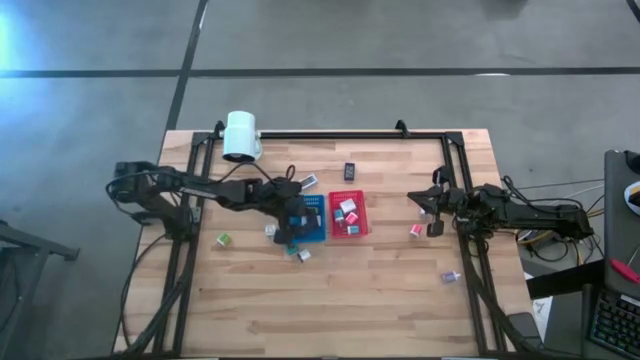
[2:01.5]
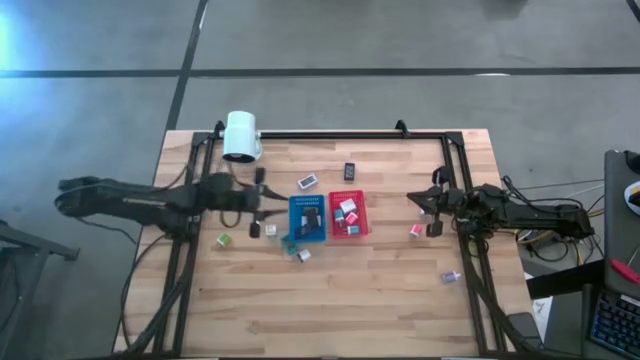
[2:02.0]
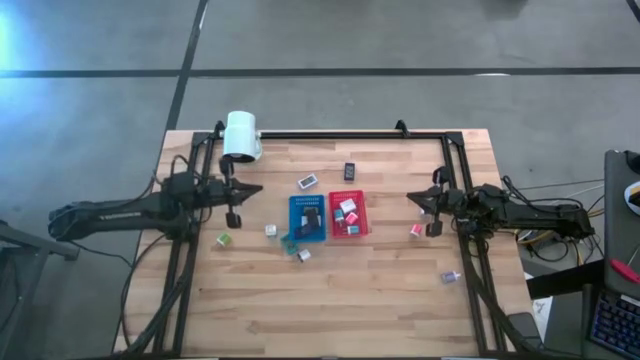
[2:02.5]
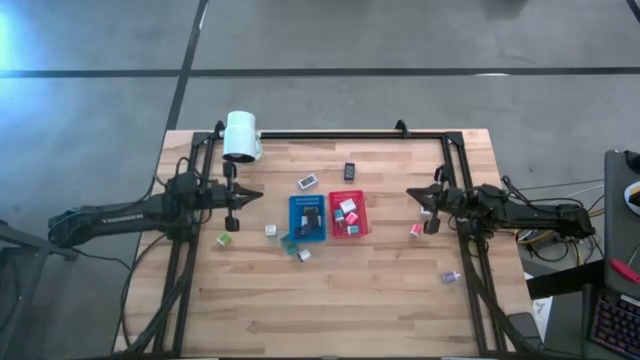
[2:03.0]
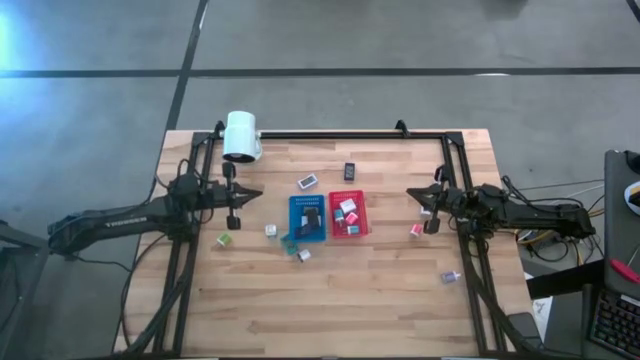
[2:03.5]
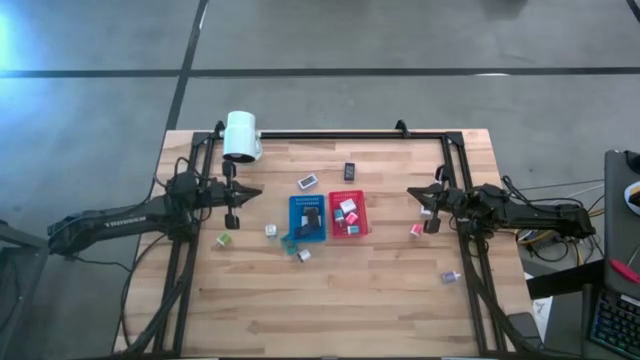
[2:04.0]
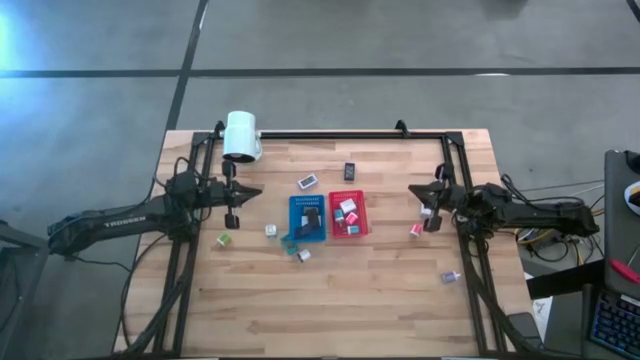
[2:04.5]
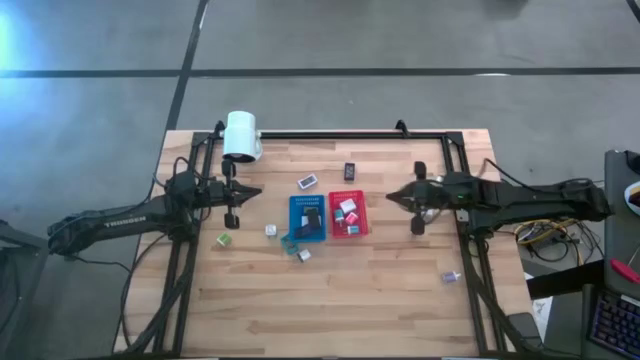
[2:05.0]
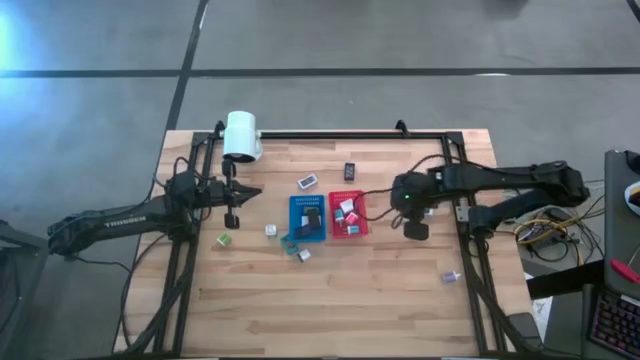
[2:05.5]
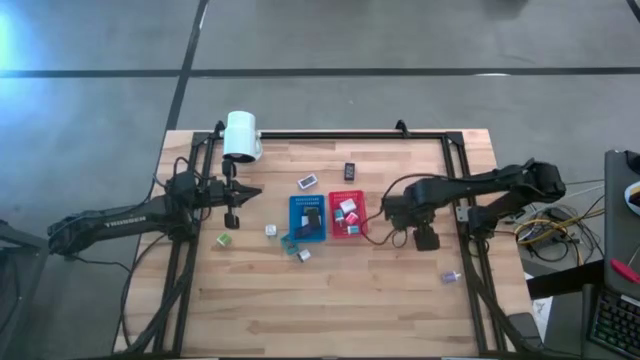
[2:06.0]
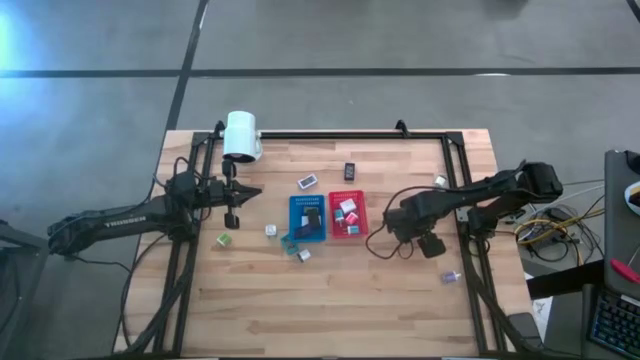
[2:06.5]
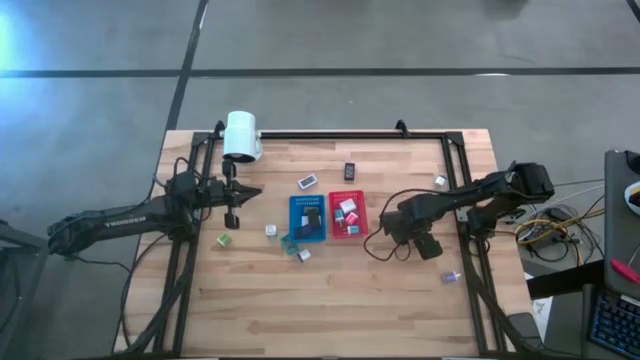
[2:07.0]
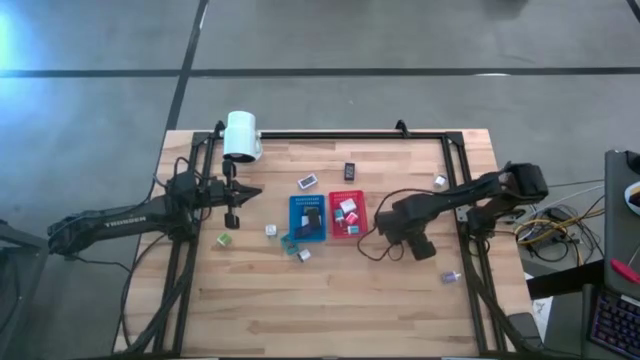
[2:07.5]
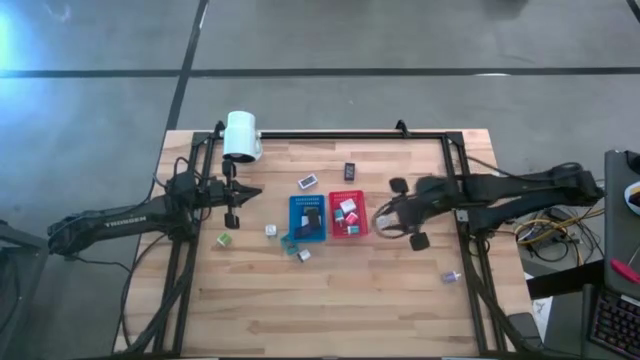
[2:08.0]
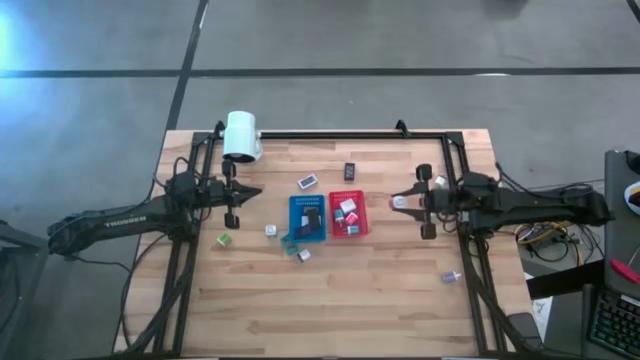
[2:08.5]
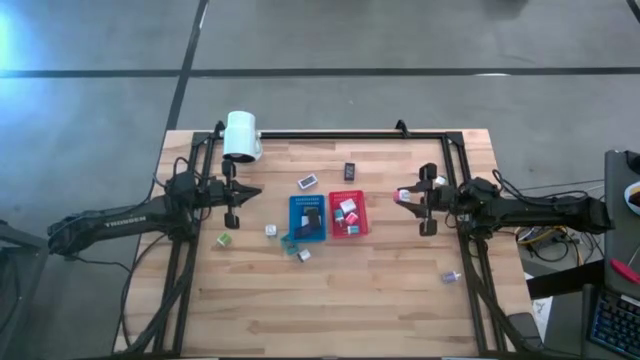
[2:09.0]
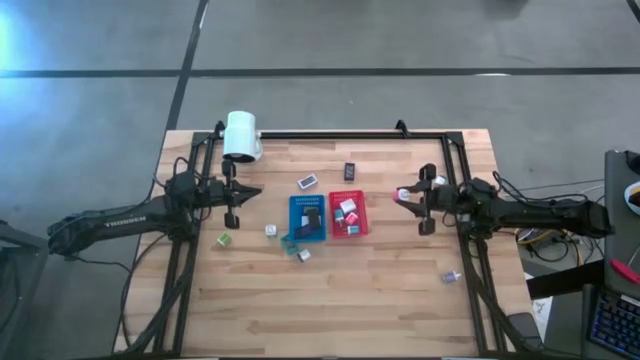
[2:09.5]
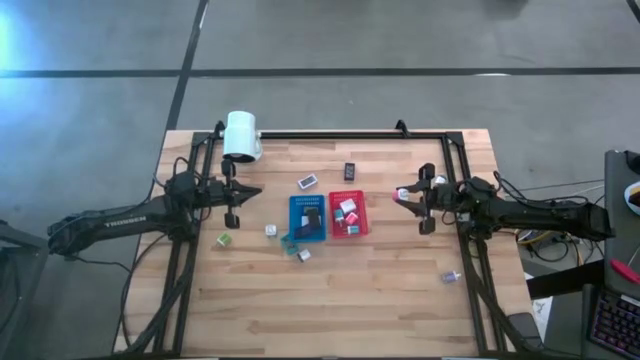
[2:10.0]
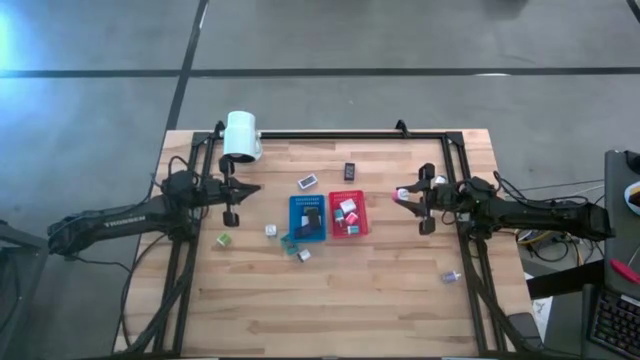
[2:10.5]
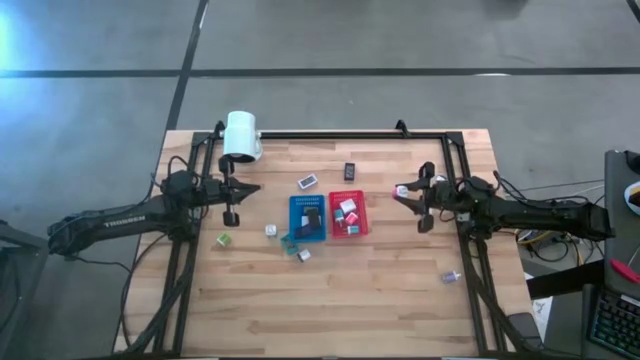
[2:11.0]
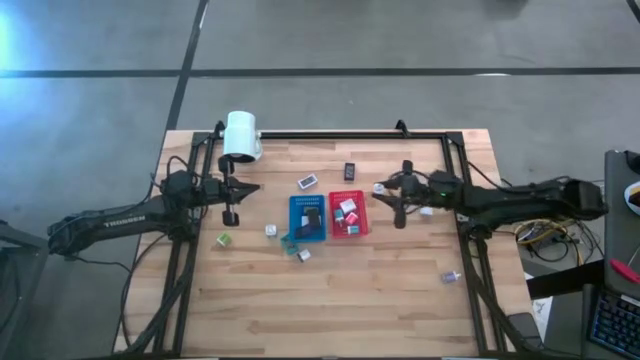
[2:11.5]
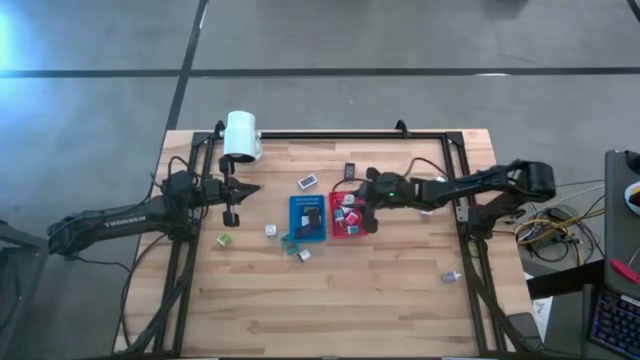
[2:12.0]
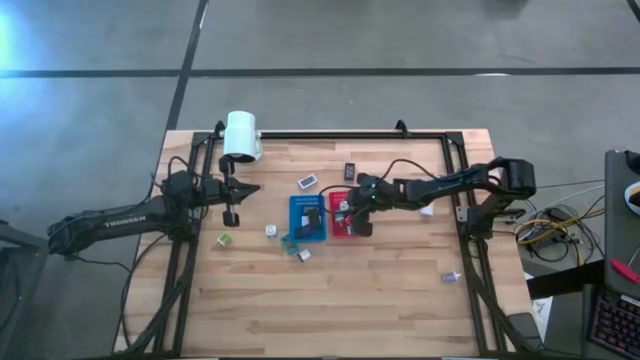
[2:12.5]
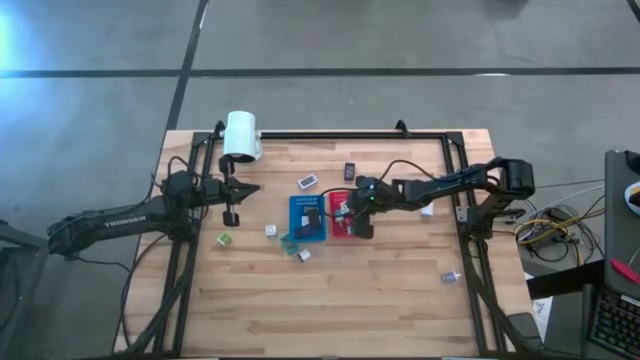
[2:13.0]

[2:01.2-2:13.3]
Task: Pick & Place Office items
Put the pink adaptor into the red bin

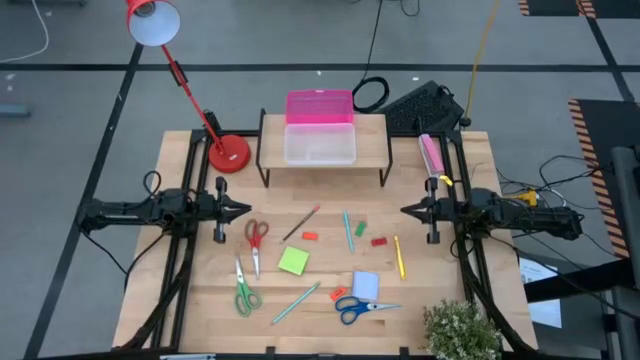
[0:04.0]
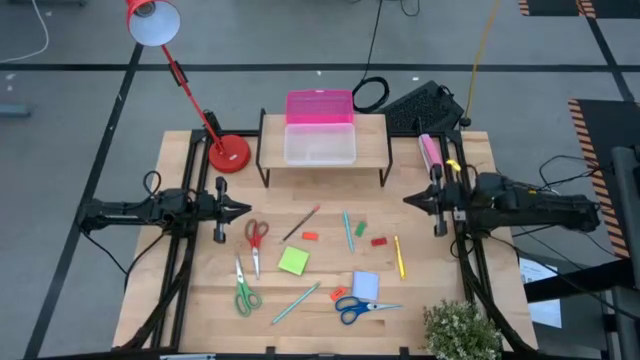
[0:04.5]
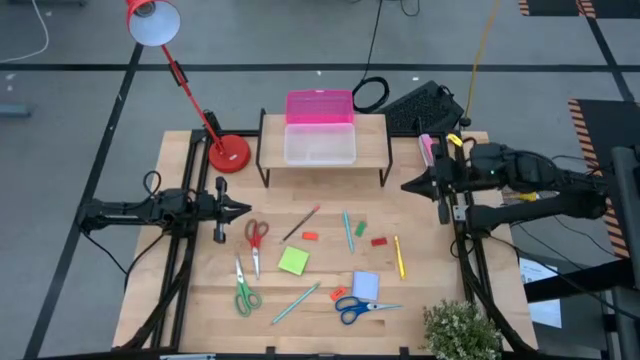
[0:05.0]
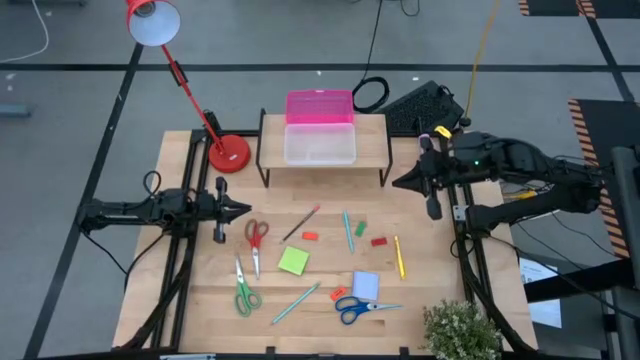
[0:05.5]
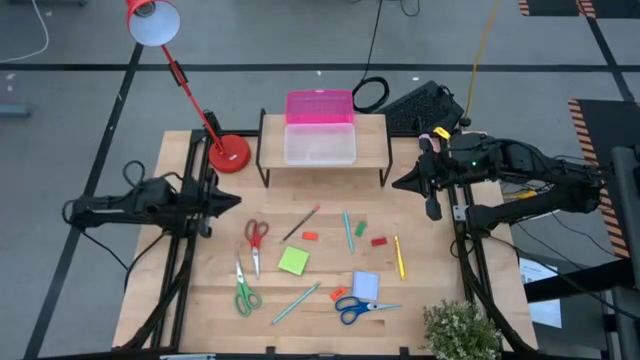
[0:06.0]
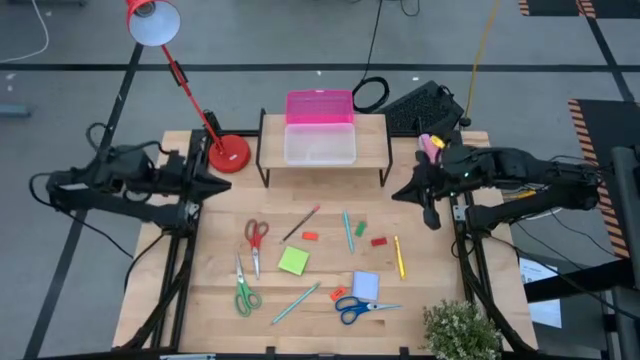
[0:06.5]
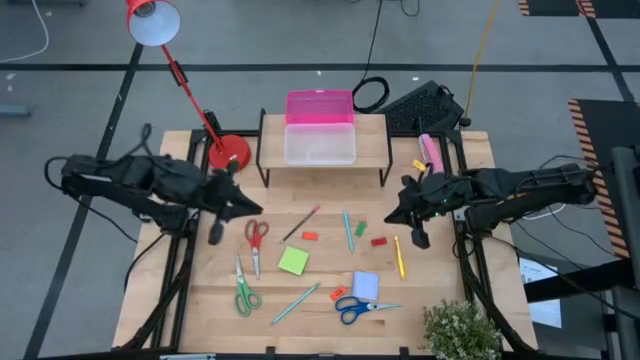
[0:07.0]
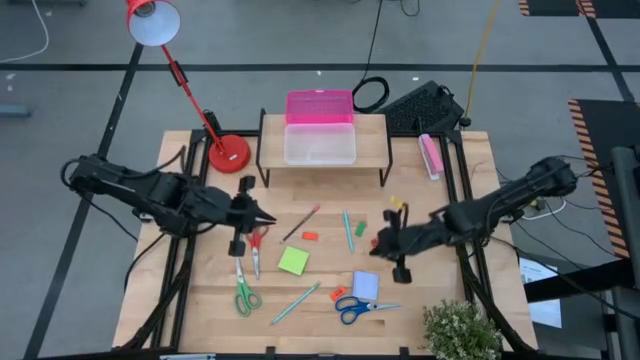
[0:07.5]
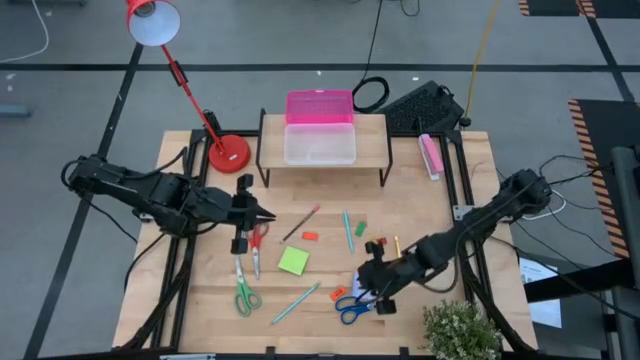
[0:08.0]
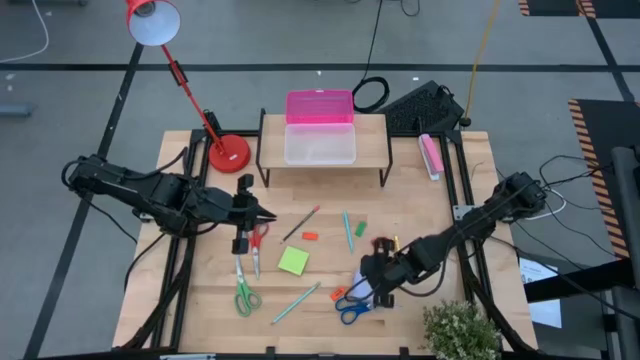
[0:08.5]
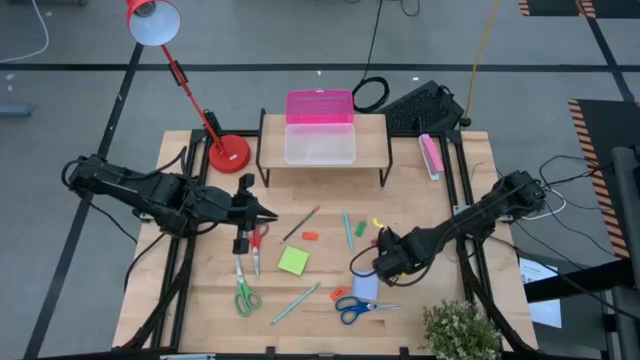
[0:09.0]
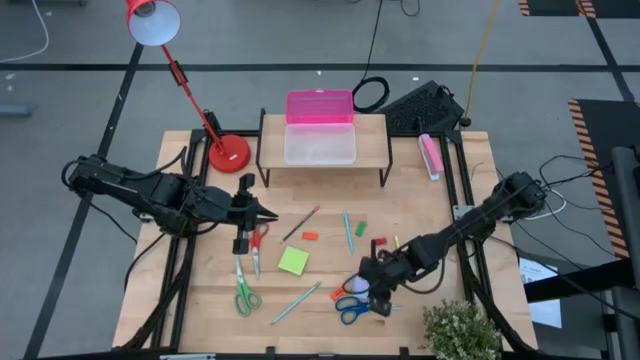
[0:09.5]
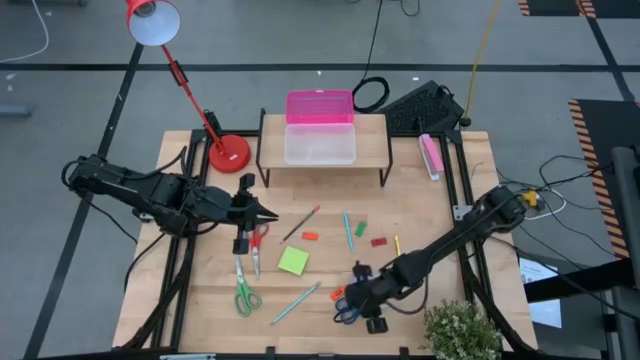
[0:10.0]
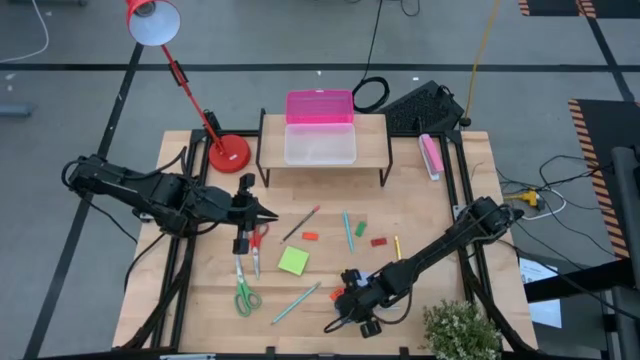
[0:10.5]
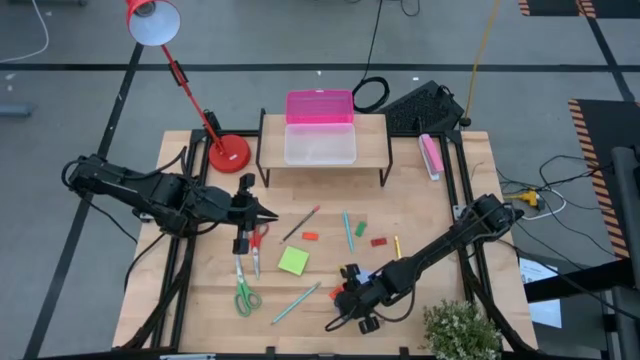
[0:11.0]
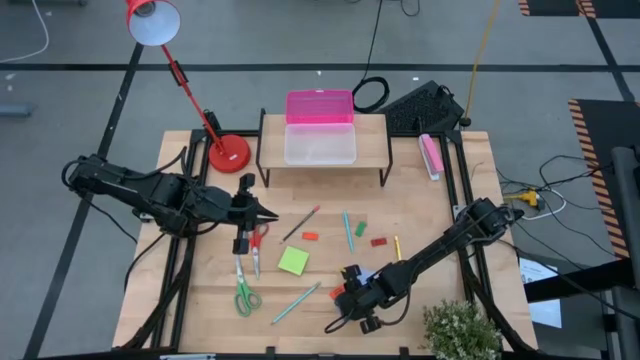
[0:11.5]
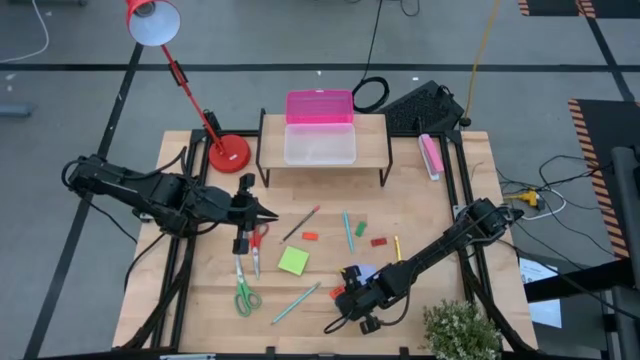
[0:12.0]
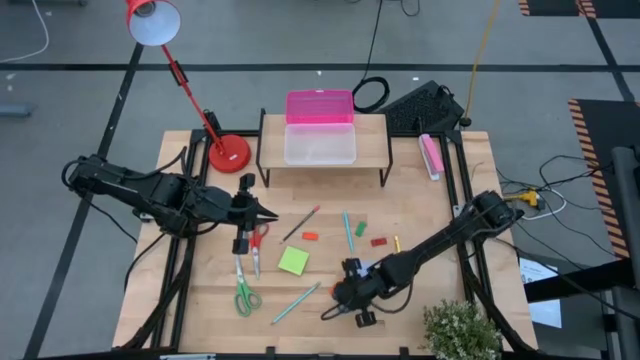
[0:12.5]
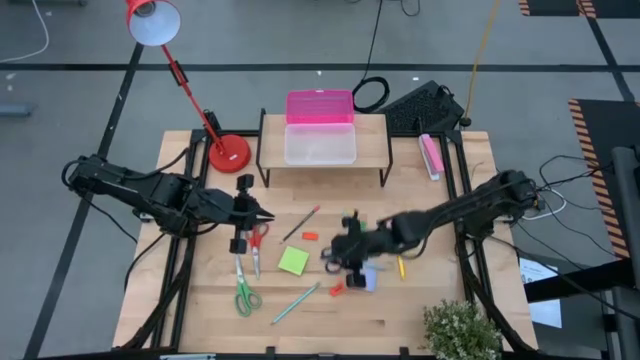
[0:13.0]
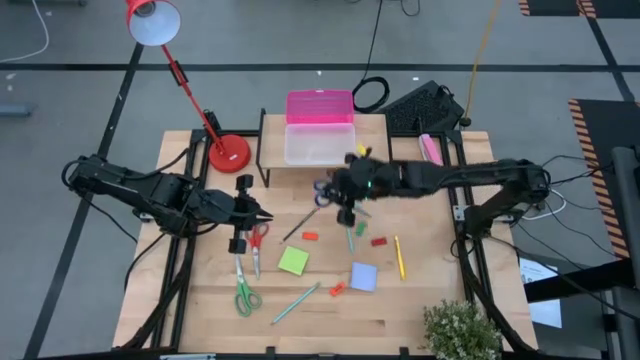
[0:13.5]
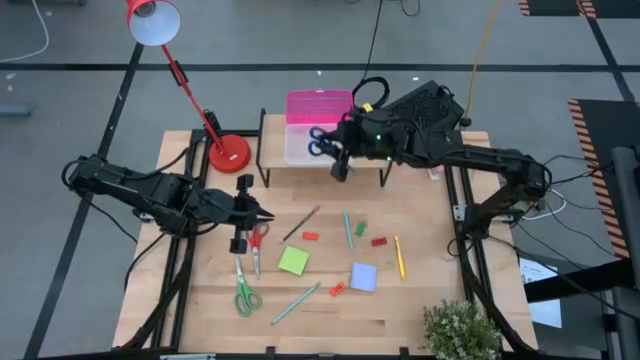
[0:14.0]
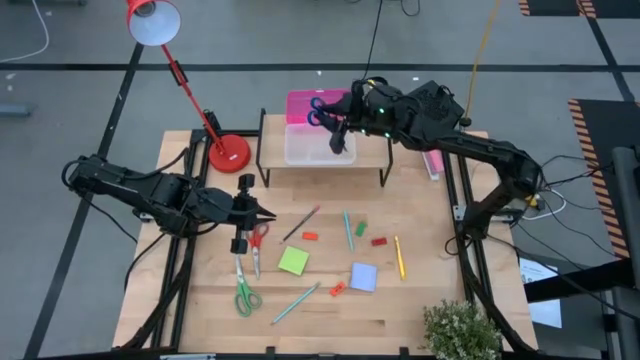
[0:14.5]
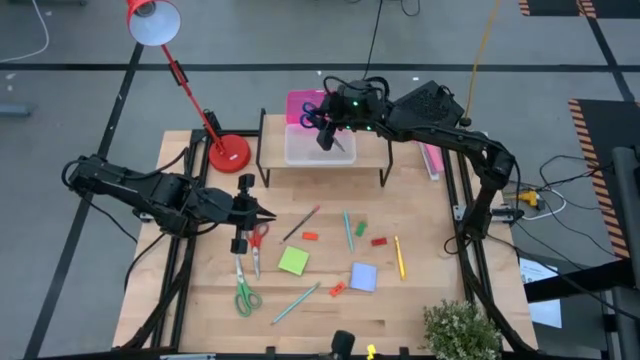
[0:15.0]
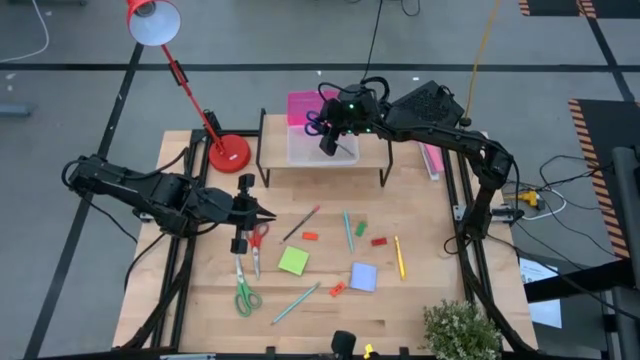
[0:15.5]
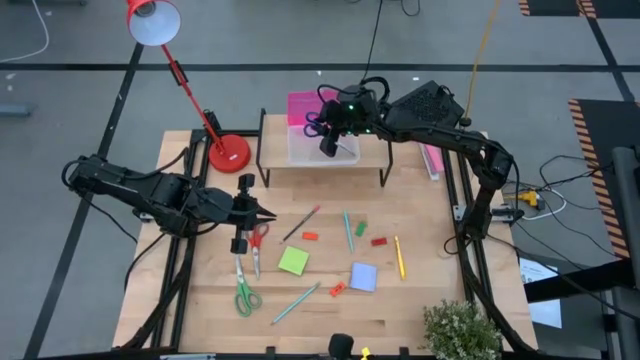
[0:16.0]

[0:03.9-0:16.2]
Task: Pack school essentials
Put the blue scissors into the pink supply box on the shelf
